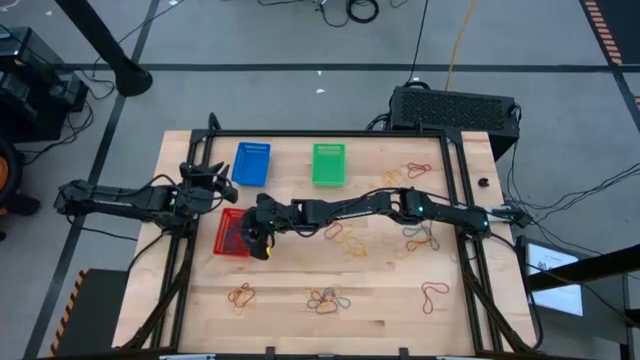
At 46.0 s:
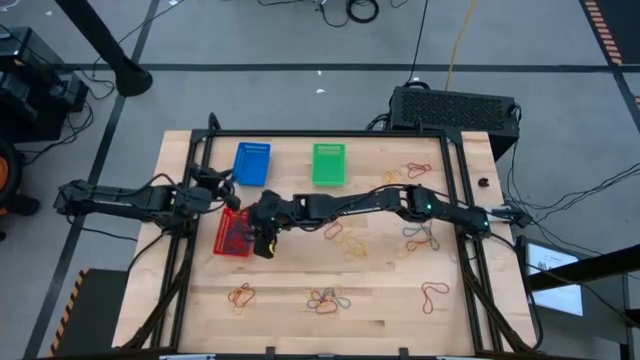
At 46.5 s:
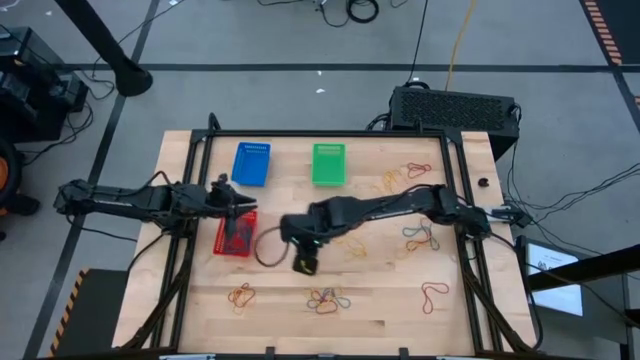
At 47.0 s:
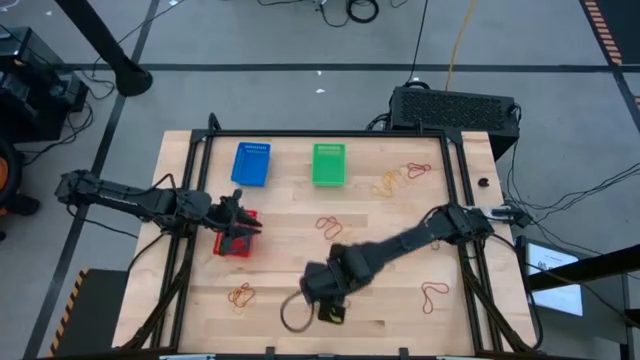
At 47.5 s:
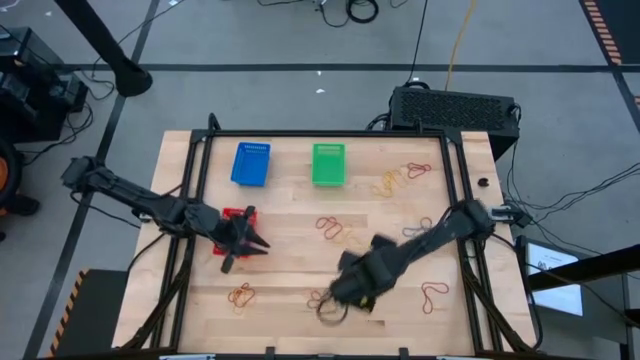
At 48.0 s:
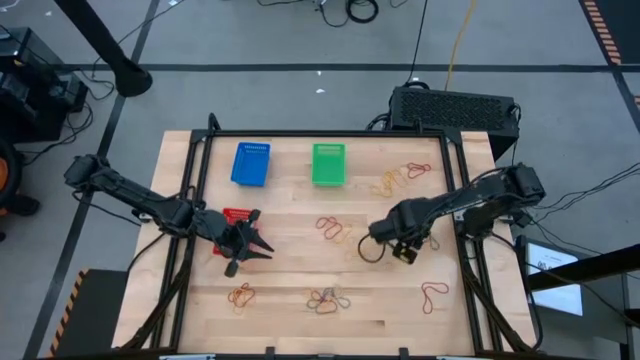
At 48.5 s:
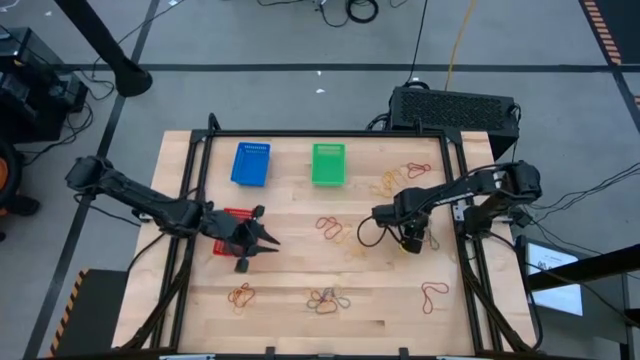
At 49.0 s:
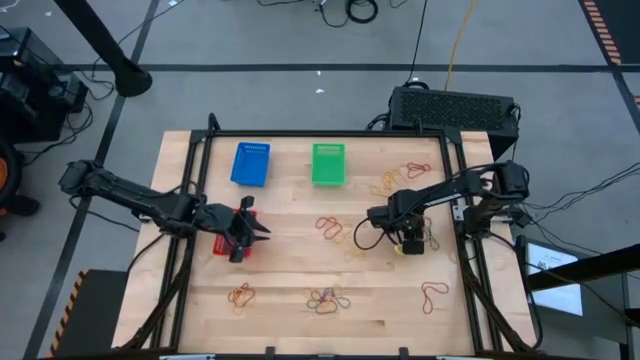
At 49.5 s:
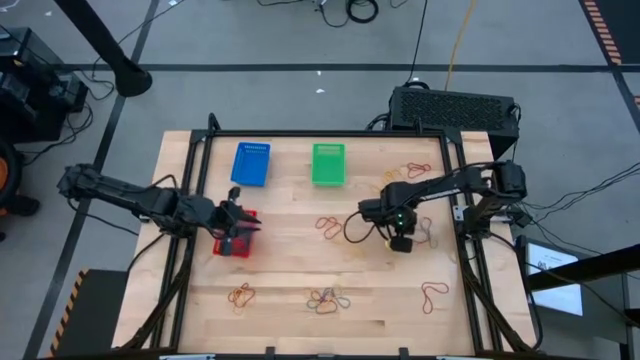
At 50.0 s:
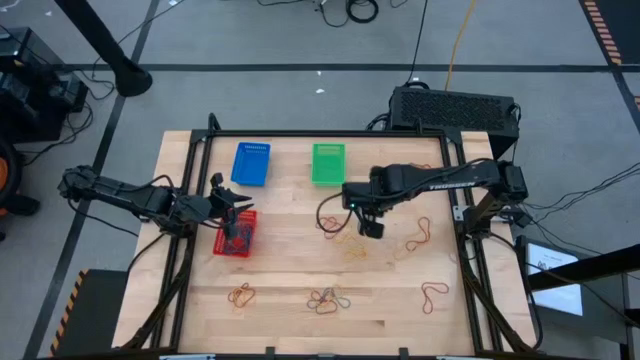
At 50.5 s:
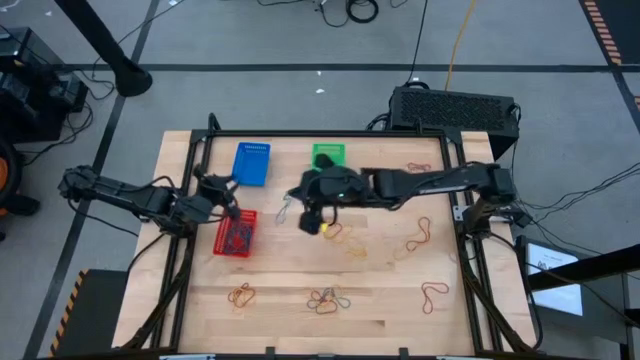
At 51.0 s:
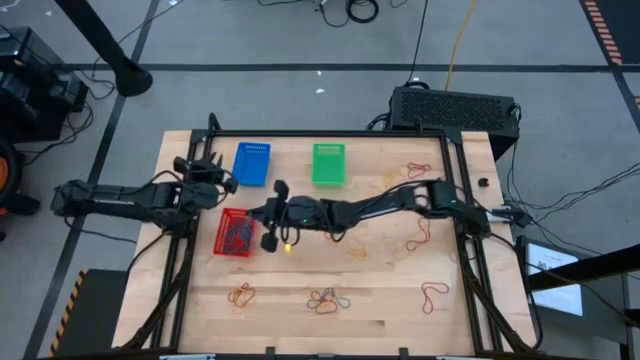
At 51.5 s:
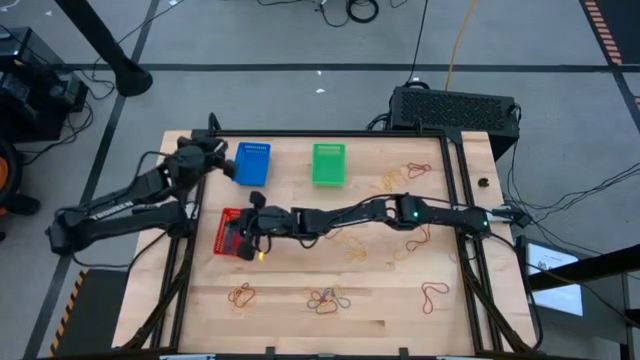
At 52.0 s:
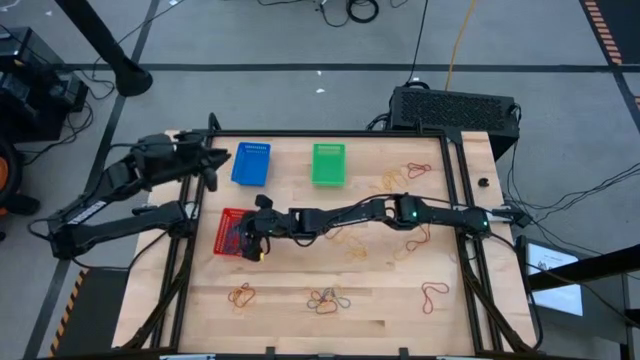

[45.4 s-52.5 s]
Task: Sort rubber bands into baskets
Put the blue rubber band into the red basket

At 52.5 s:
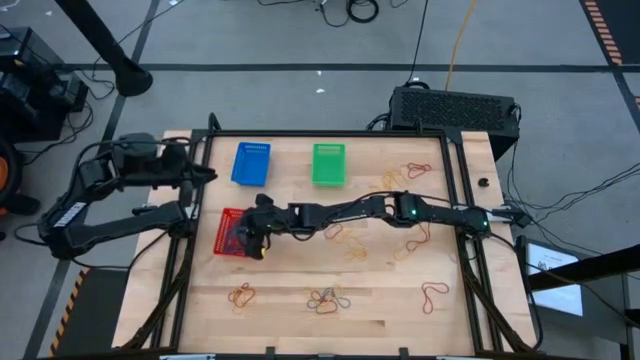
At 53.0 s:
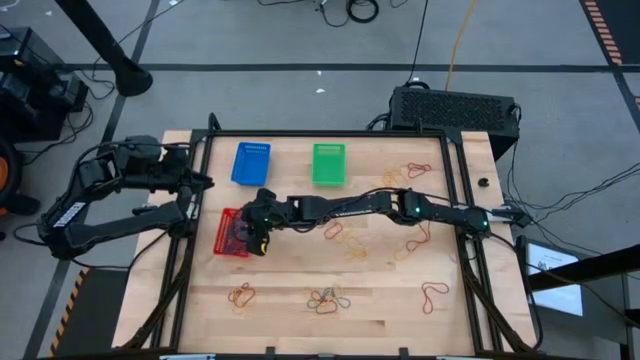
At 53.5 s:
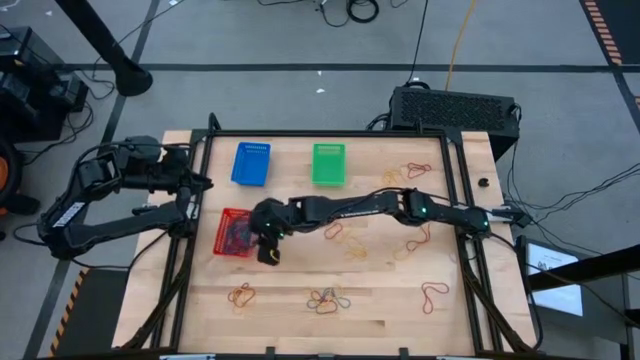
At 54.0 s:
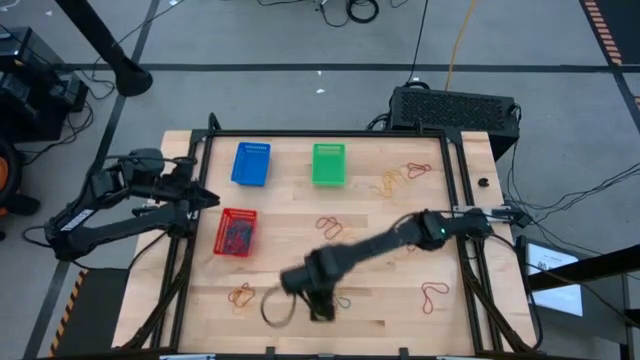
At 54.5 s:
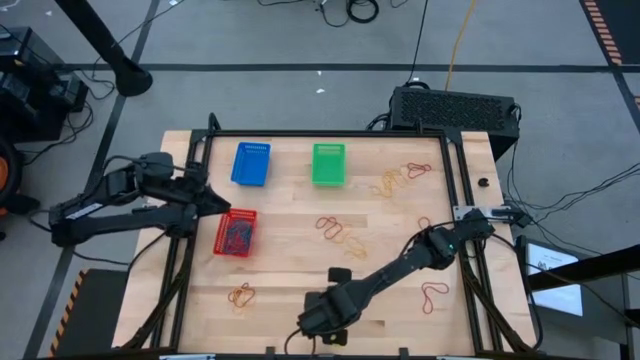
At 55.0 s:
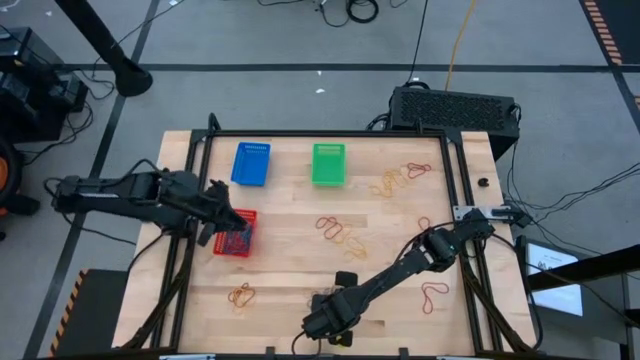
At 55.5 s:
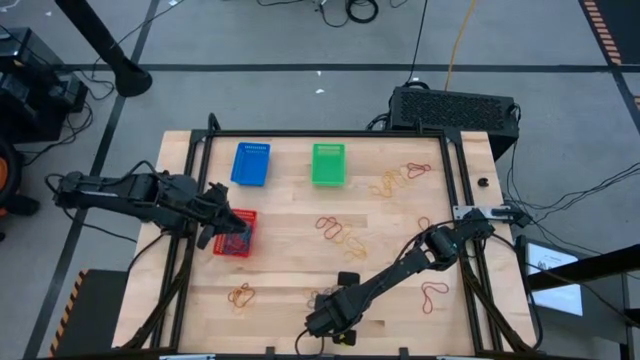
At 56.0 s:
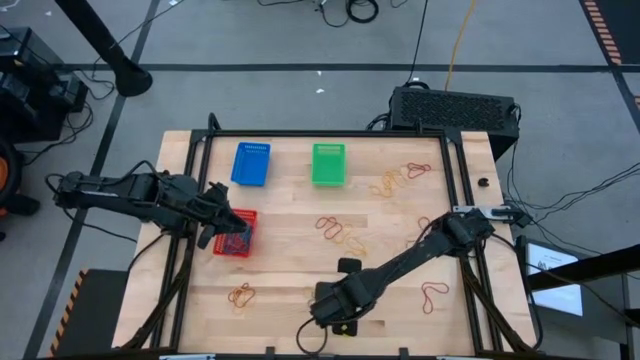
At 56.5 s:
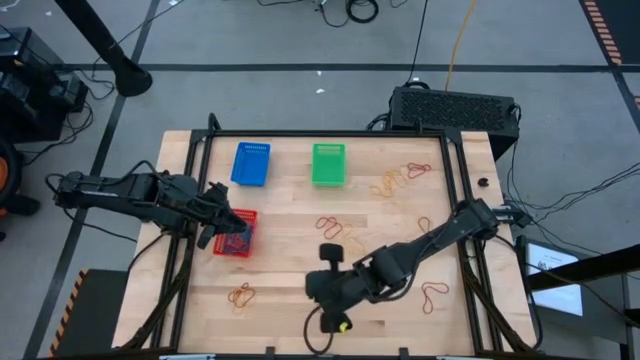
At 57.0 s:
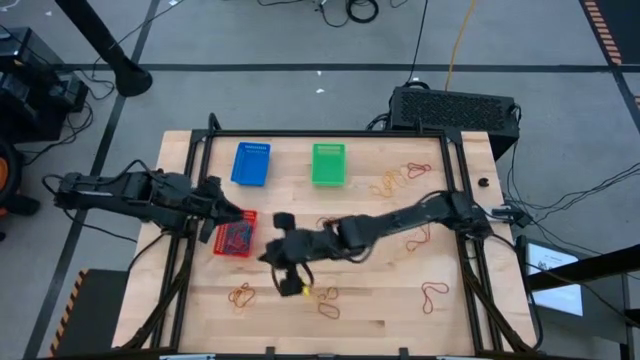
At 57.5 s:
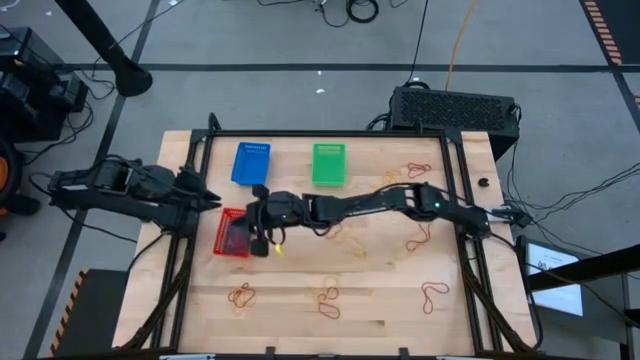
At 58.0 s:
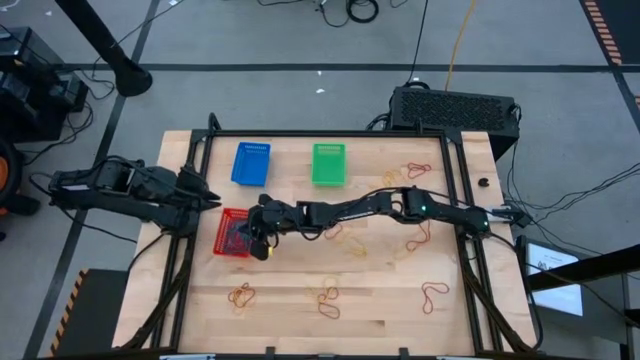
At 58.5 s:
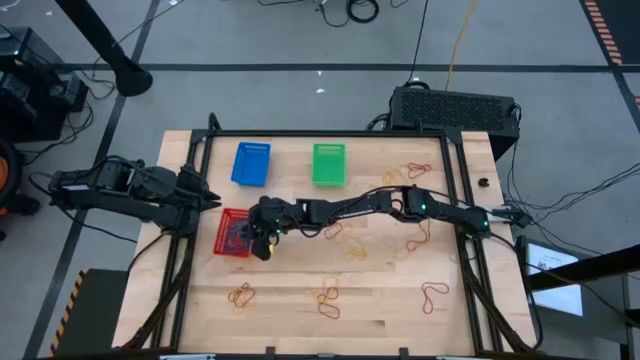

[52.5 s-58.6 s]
Put the blue rubber band into the red basket

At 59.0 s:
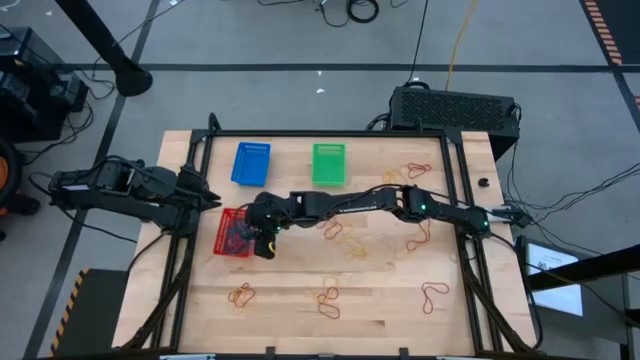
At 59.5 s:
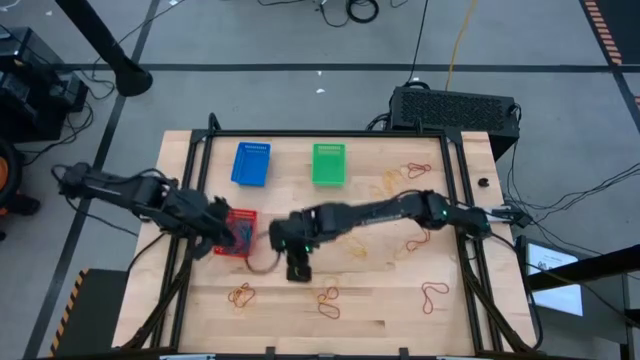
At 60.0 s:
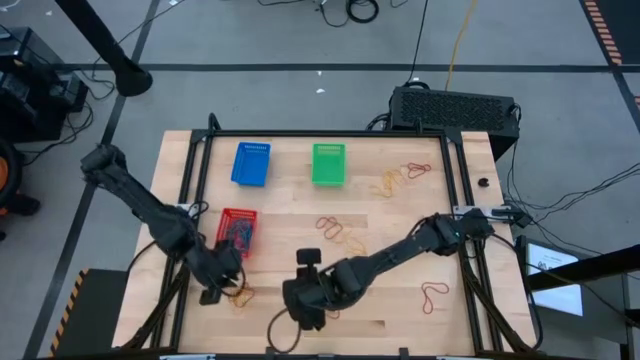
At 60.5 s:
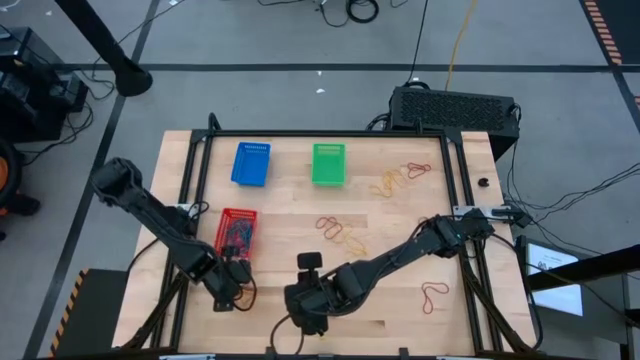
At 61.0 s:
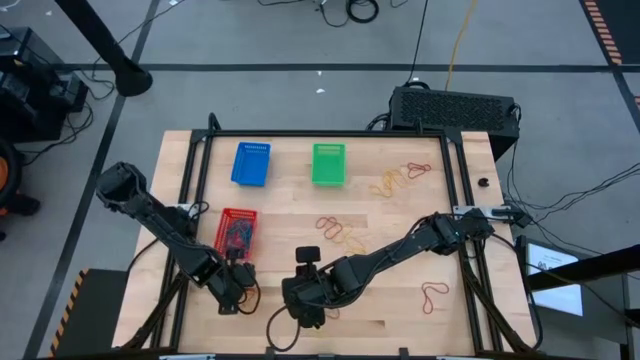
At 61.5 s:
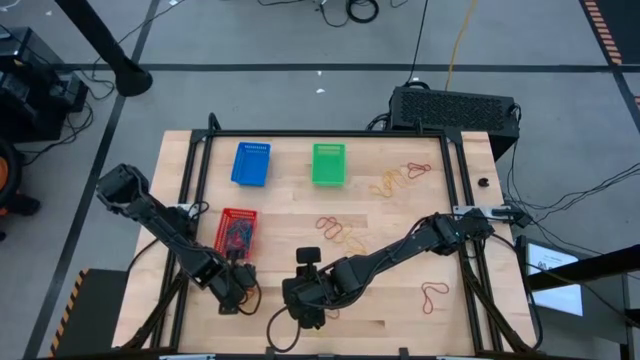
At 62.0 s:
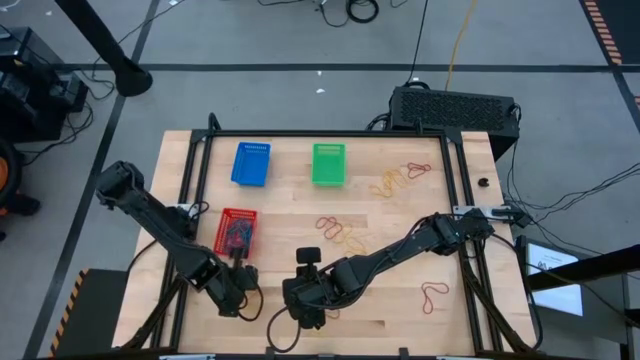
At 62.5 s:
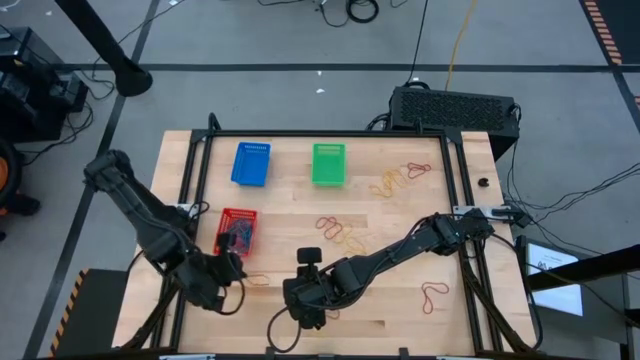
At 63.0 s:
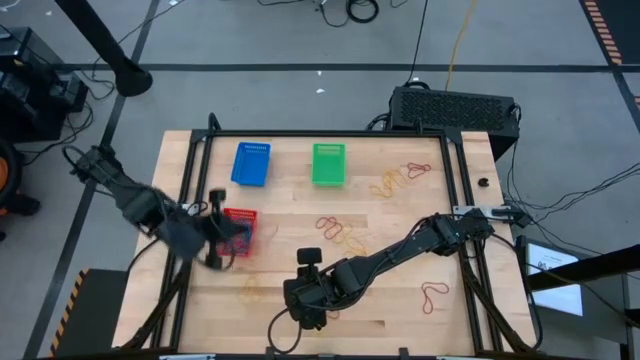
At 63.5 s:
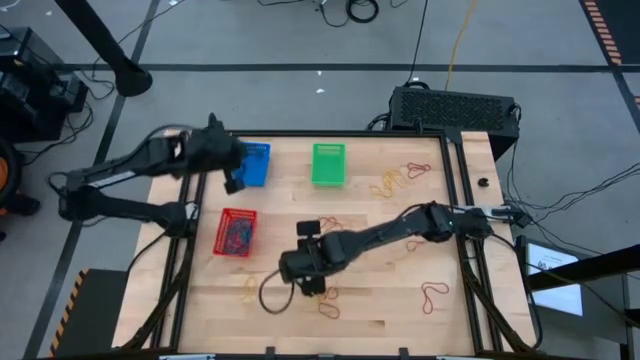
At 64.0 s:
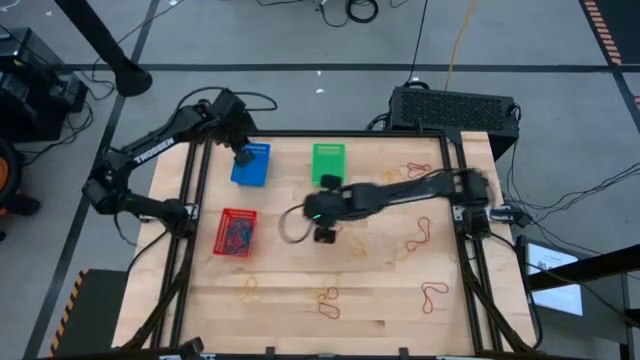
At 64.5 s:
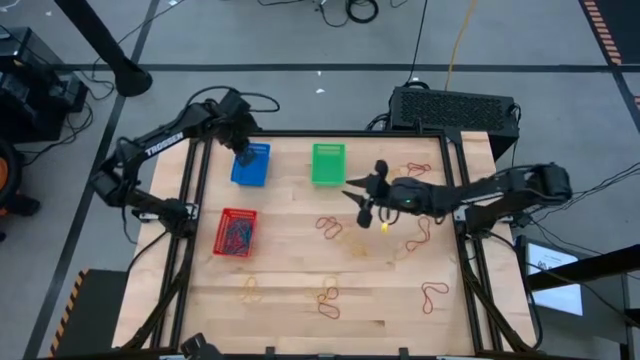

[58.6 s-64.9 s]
Put the red rubber band into the blue basket
